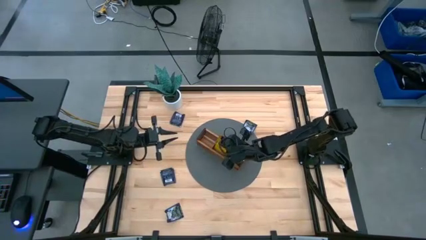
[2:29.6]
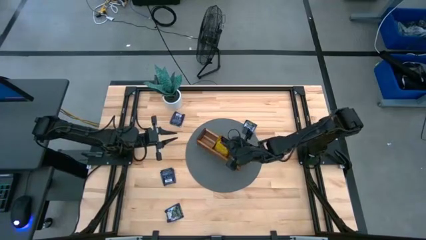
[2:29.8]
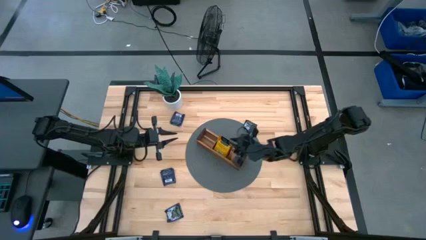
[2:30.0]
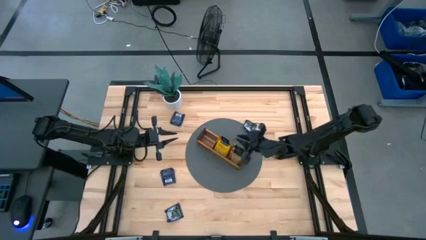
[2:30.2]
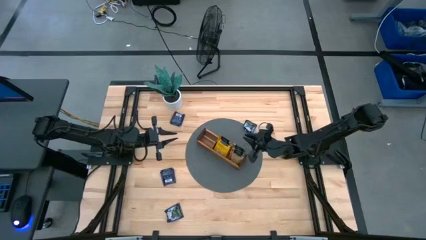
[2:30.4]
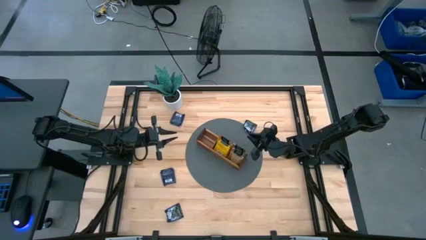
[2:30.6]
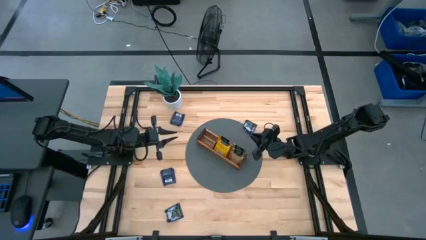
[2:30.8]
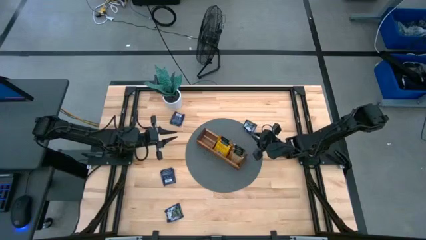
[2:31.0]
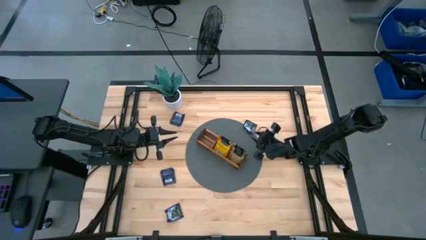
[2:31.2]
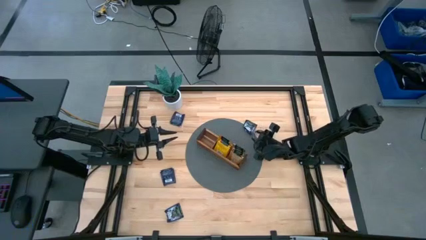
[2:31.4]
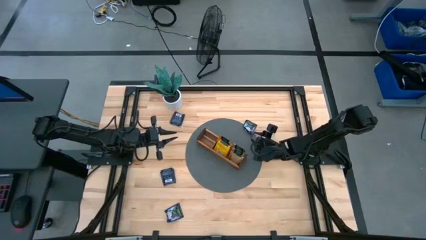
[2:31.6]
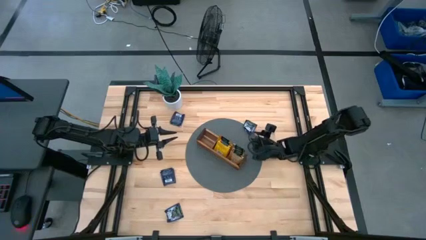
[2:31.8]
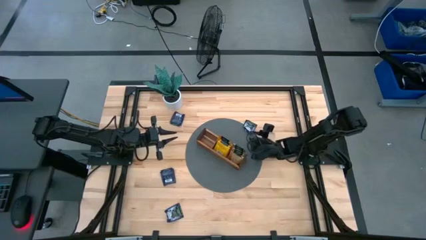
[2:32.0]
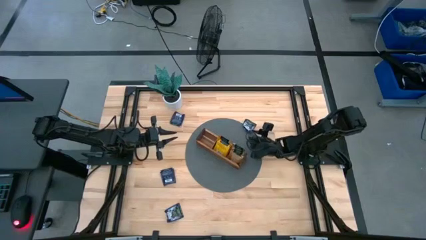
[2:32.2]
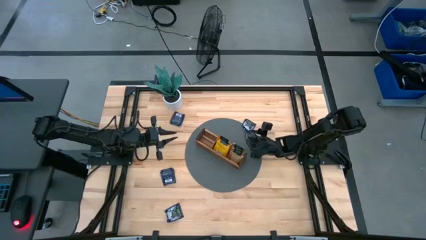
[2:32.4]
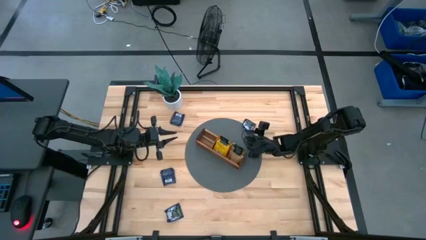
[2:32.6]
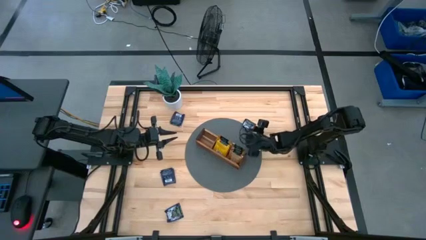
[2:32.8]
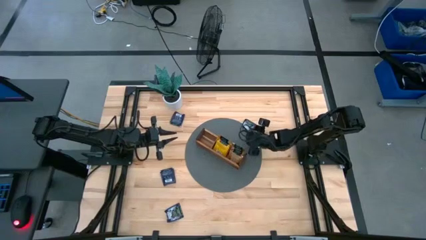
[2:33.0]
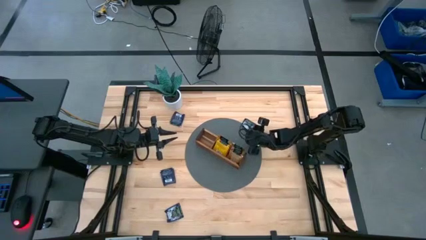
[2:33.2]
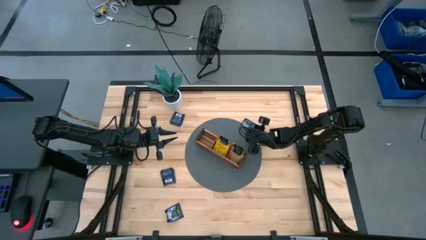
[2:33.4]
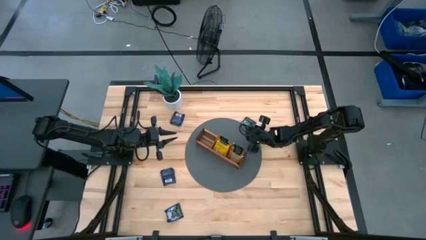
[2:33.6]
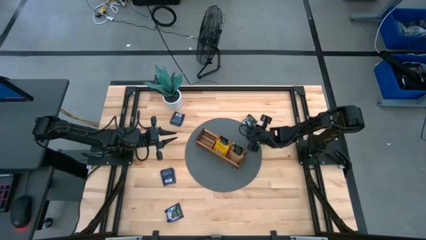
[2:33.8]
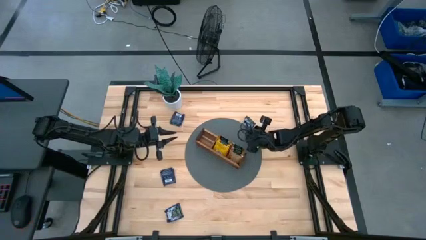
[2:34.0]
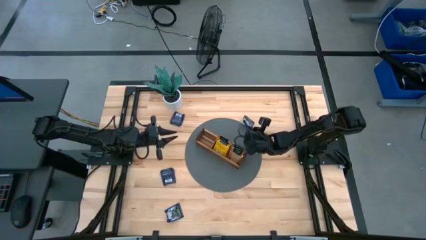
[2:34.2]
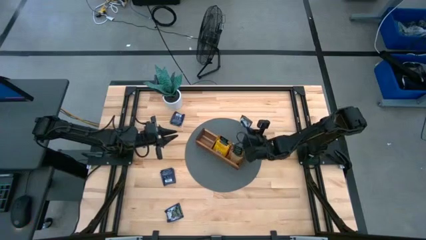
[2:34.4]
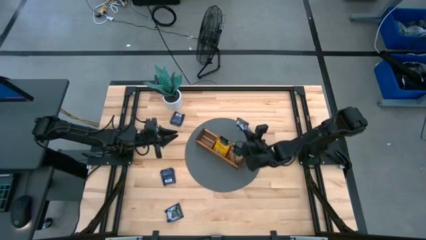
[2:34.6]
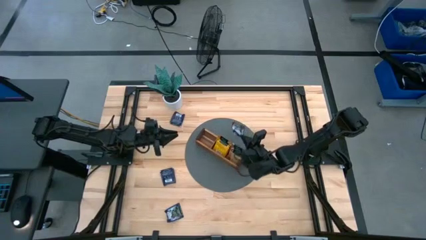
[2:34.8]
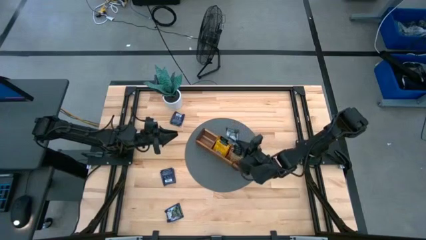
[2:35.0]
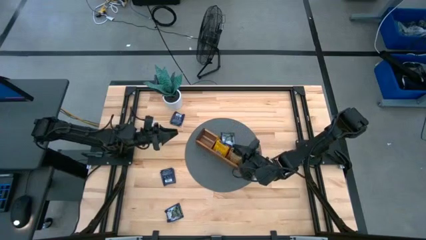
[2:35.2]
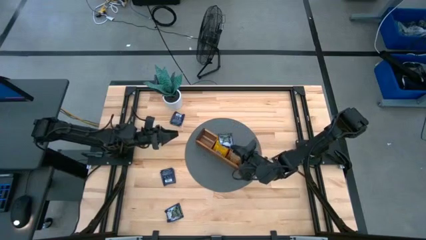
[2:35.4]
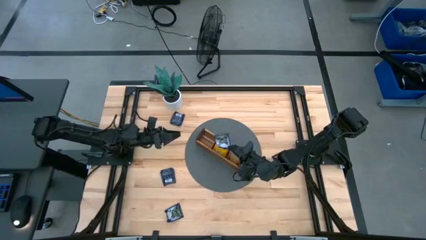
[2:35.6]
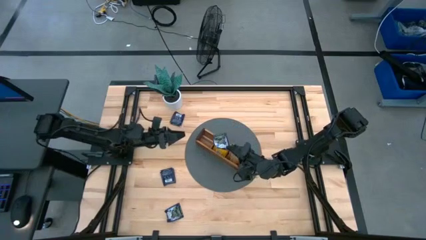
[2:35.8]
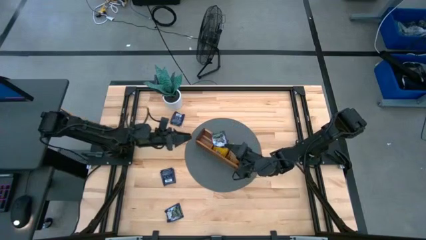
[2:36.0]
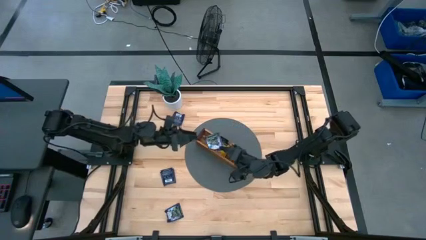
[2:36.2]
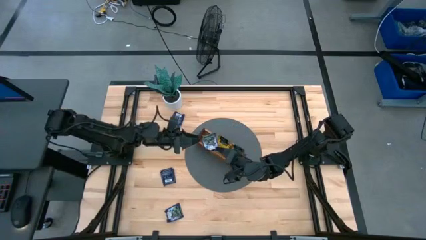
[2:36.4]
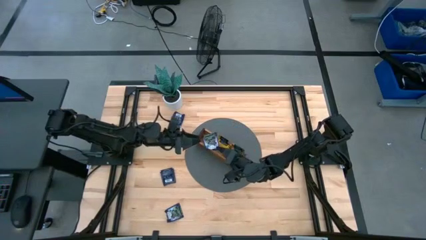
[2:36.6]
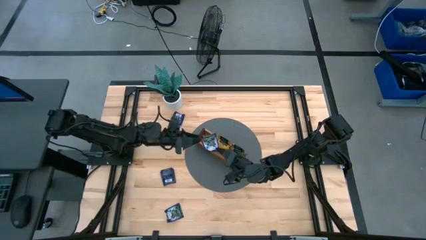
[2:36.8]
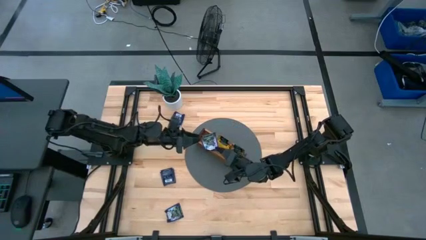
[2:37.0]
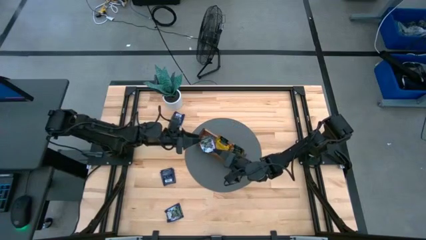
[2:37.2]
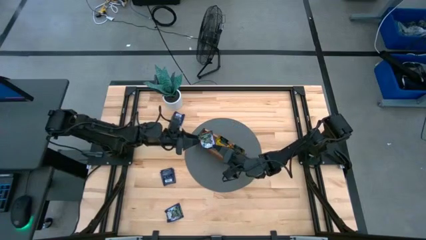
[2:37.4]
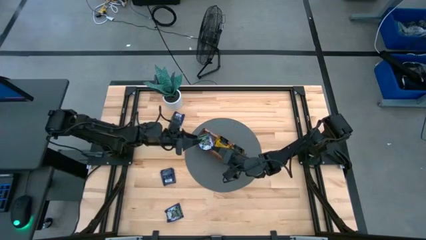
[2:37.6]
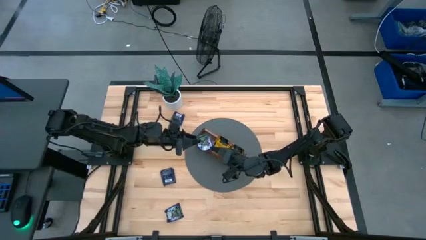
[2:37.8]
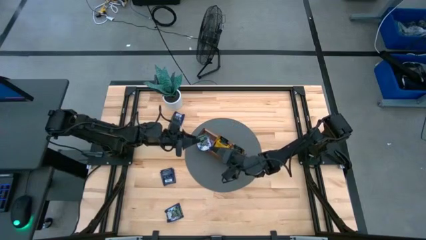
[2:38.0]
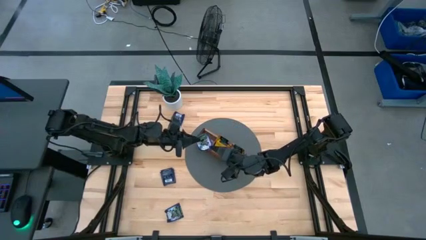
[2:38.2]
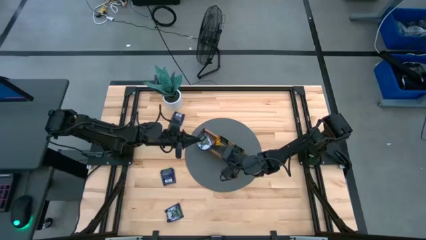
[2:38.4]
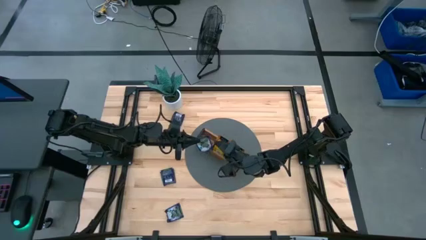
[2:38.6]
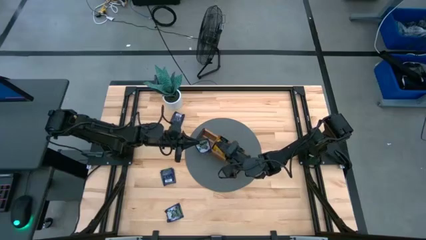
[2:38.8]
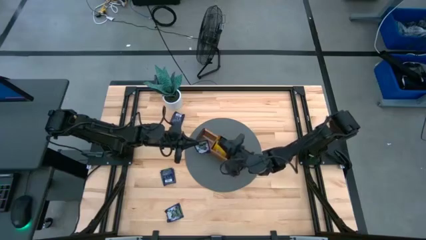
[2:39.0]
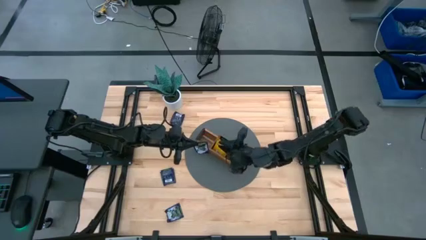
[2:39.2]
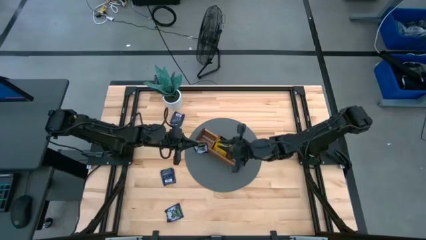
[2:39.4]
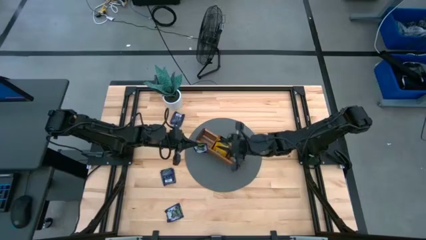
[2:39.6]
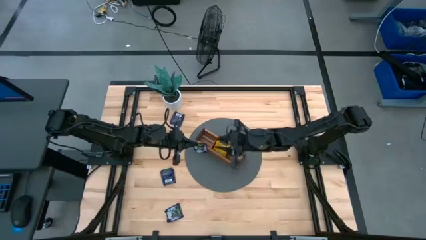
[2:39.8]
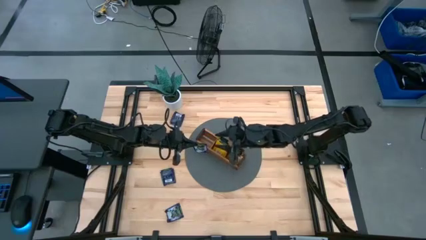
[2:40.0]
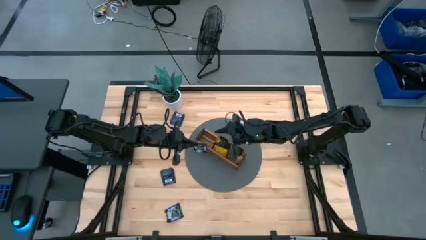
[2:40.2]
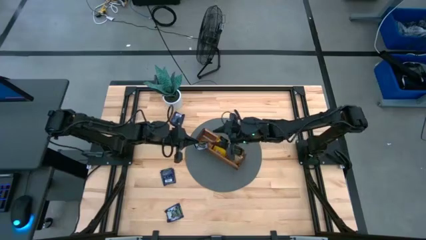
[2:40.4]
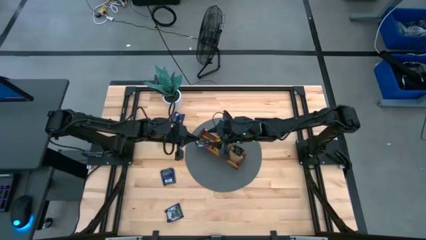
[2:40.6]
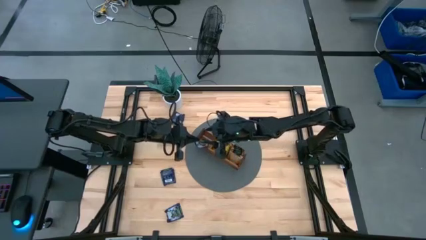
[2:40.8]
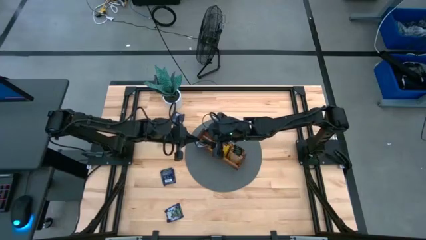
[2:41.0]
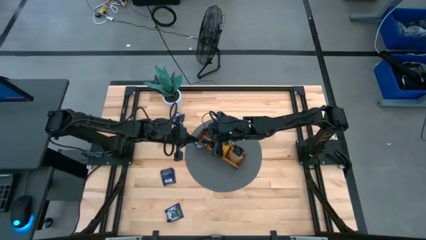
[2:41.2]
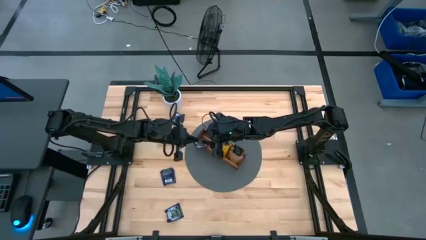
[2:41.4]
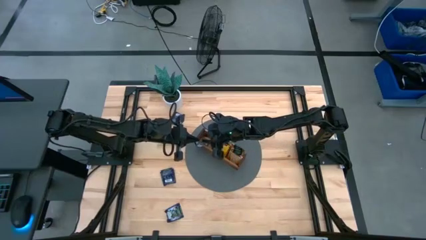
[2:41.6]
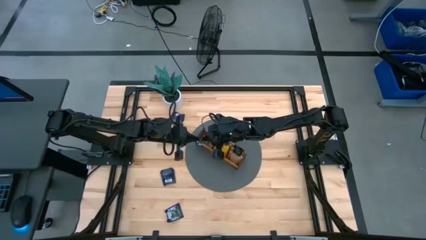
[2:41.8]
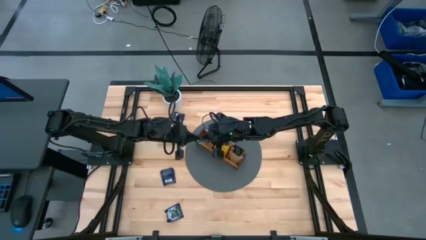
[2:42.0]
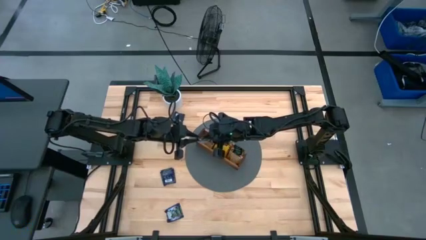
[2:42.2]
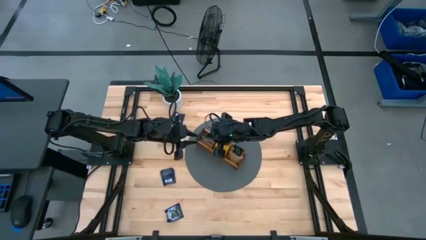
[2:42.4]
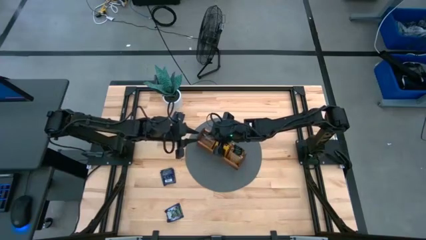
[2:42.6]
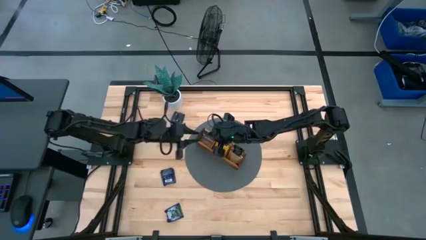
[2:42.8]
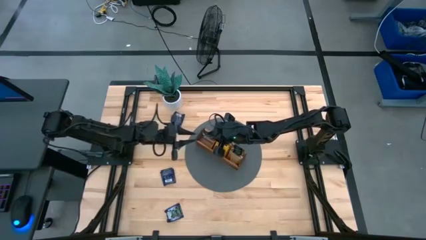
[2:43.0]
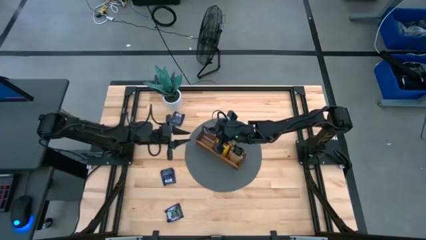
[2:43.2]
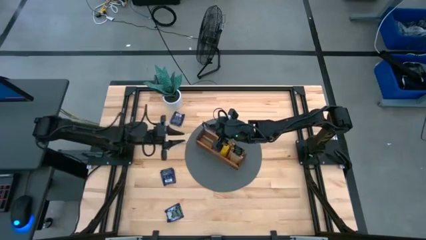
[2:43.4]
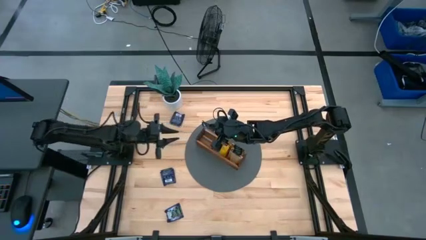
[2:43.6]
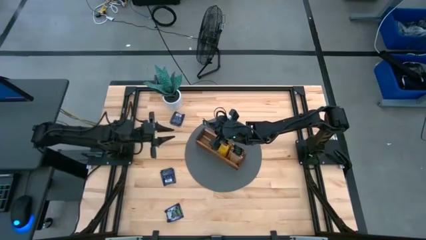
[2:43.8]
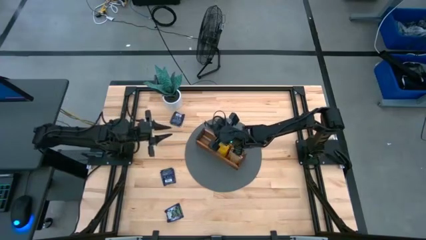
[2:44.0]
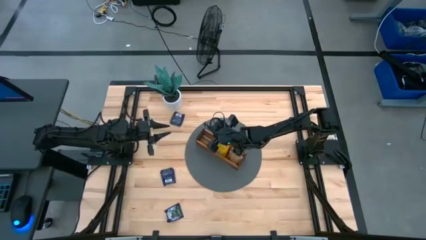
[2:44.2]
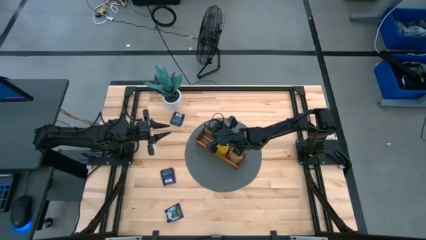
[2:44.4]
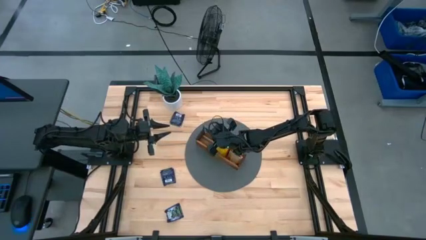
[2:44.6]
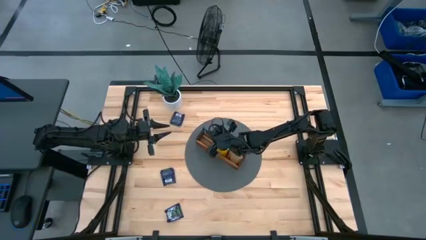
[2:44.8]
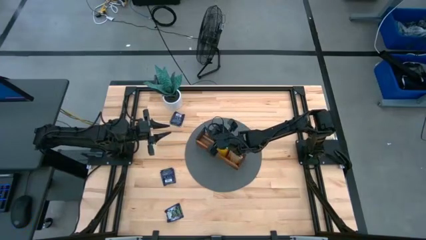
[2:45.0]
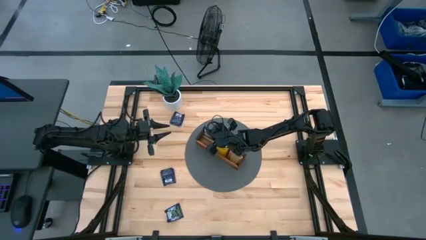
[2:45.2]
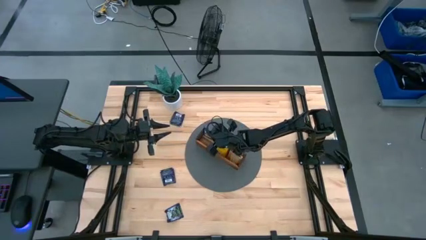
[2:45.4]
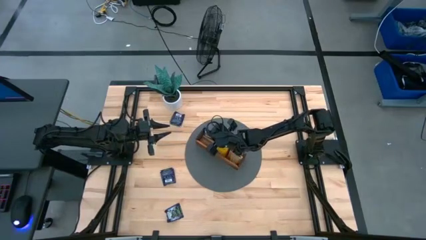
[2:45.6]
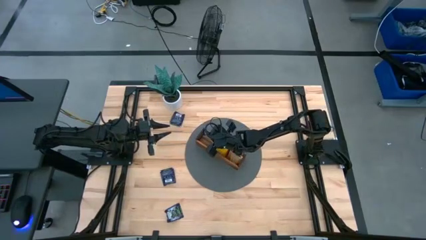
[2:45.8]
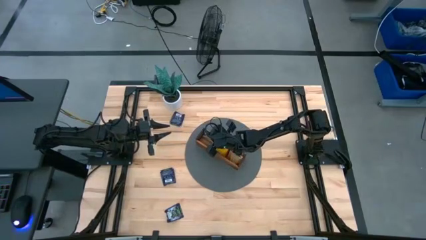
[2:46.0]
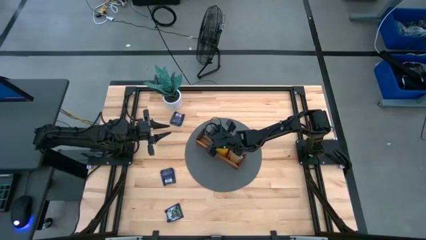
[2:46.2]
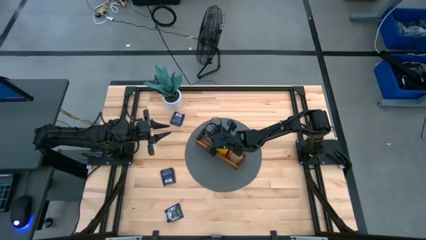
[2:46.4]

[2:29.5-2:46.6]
Task: Pick & Place Tea
Put the dark blue tea bag into the left section of the wooden organizer
